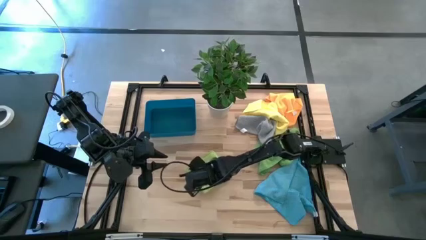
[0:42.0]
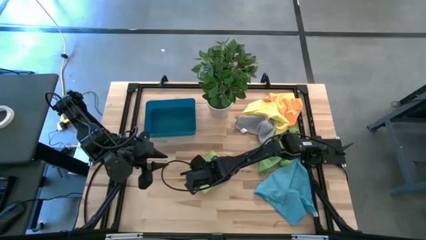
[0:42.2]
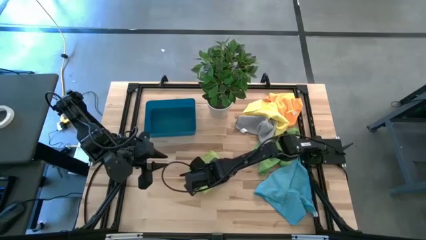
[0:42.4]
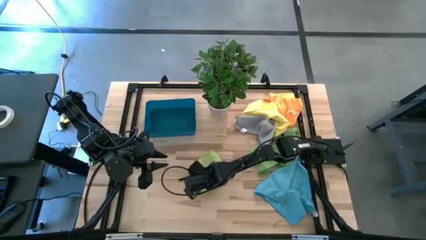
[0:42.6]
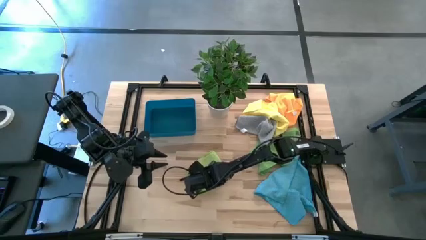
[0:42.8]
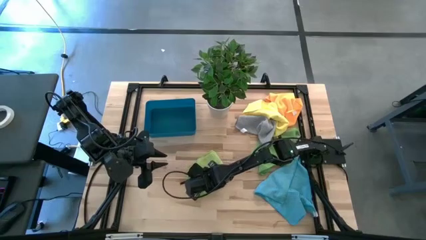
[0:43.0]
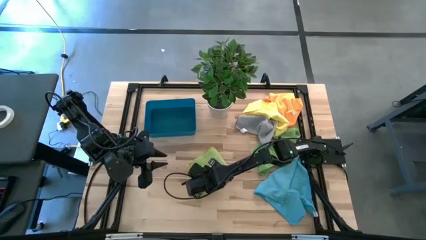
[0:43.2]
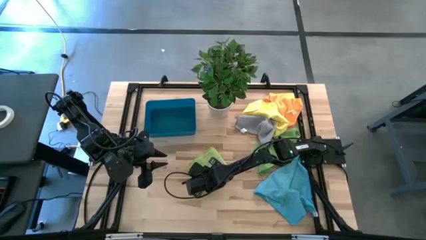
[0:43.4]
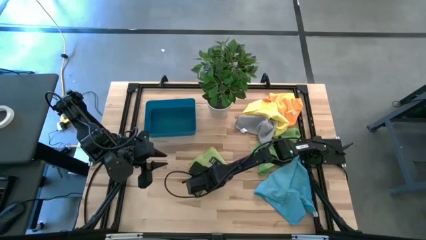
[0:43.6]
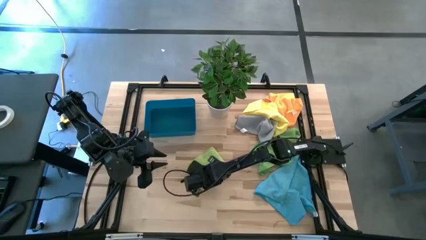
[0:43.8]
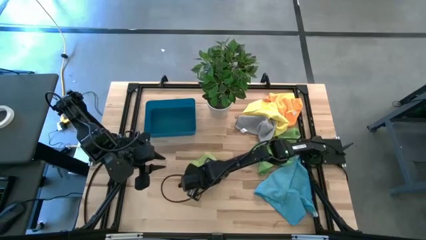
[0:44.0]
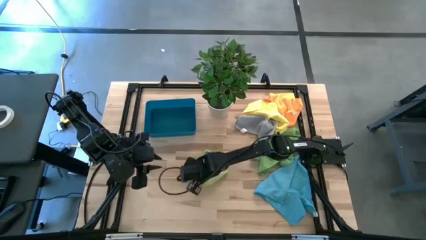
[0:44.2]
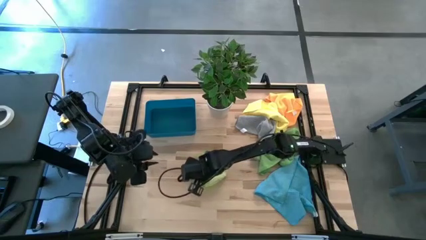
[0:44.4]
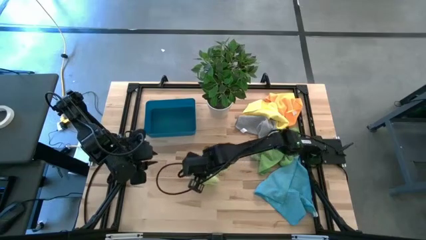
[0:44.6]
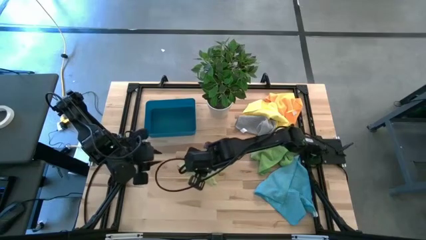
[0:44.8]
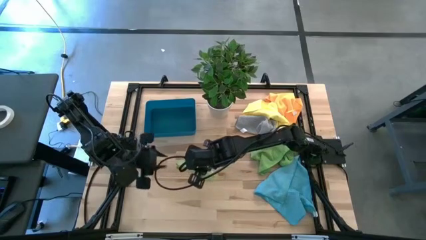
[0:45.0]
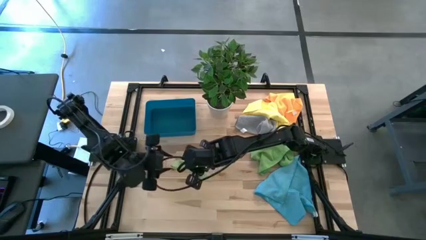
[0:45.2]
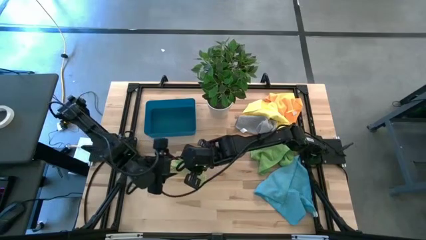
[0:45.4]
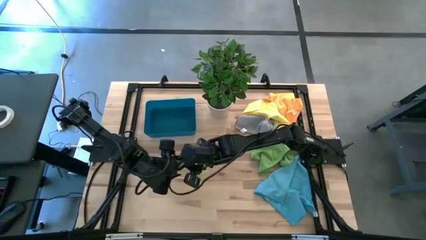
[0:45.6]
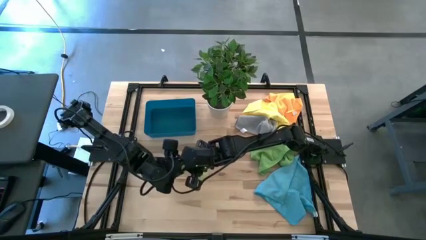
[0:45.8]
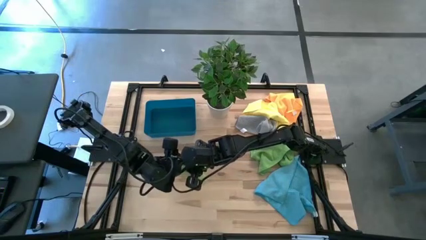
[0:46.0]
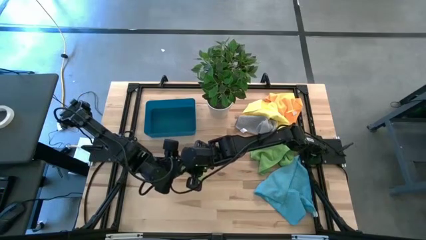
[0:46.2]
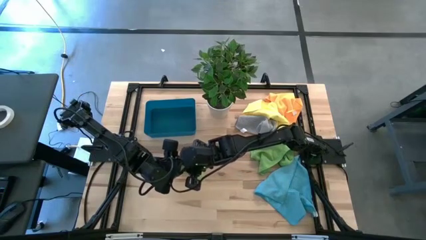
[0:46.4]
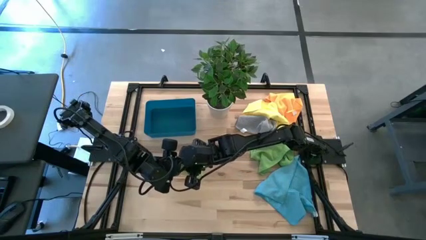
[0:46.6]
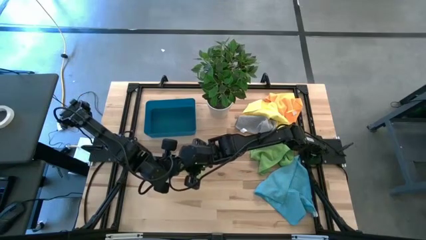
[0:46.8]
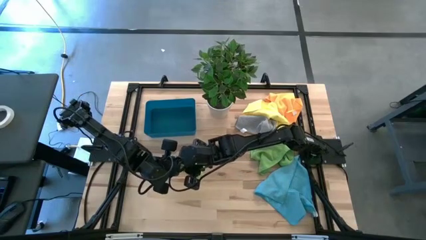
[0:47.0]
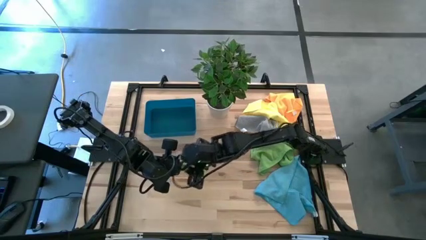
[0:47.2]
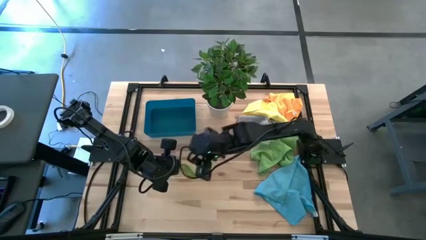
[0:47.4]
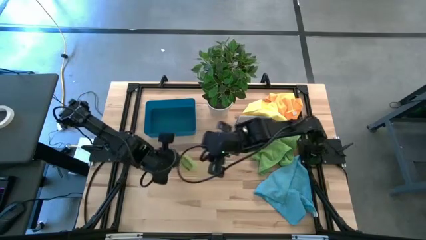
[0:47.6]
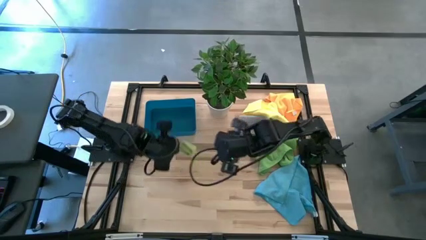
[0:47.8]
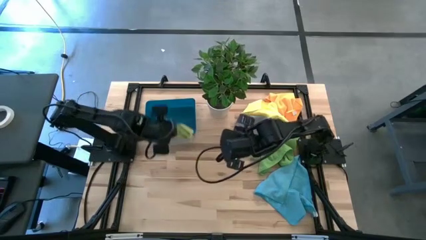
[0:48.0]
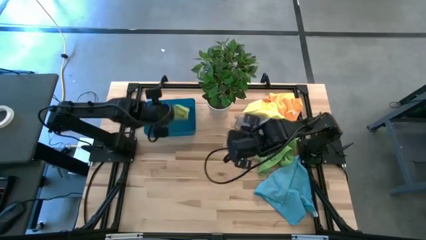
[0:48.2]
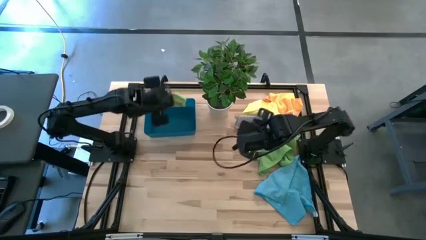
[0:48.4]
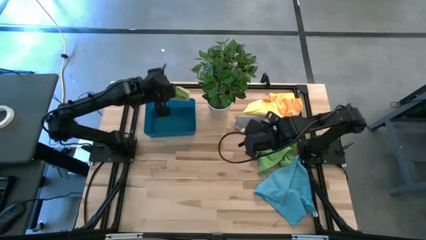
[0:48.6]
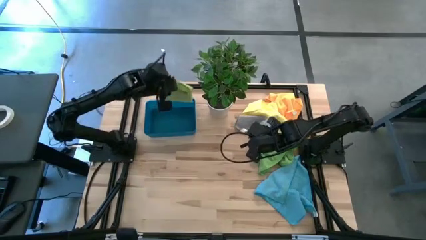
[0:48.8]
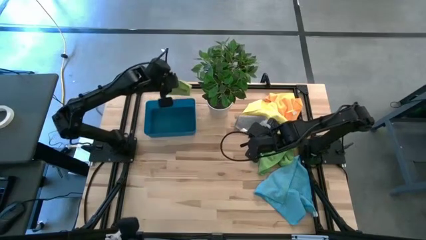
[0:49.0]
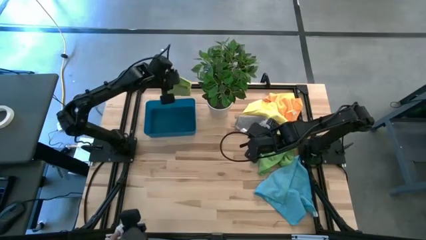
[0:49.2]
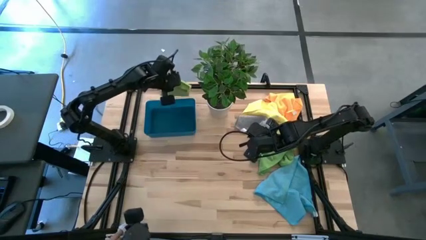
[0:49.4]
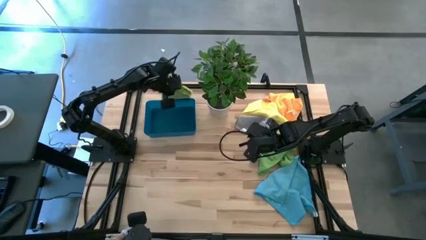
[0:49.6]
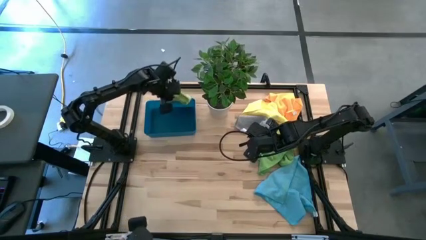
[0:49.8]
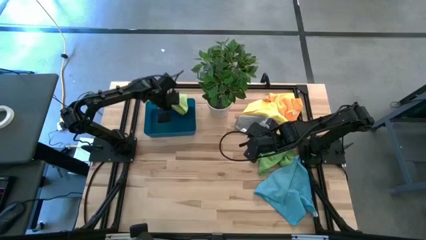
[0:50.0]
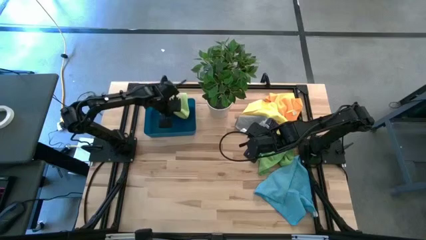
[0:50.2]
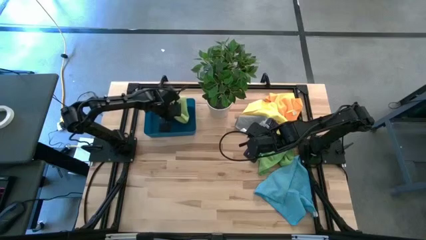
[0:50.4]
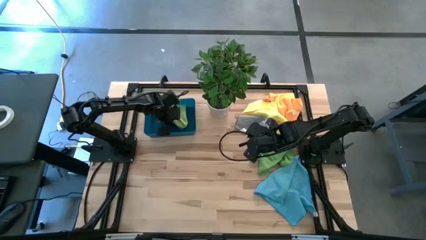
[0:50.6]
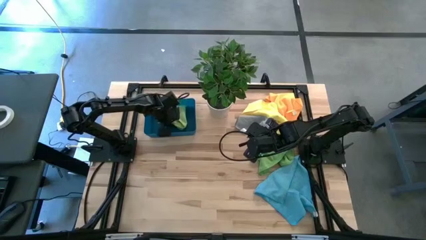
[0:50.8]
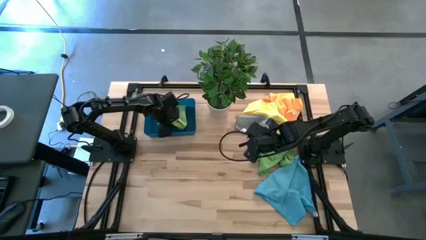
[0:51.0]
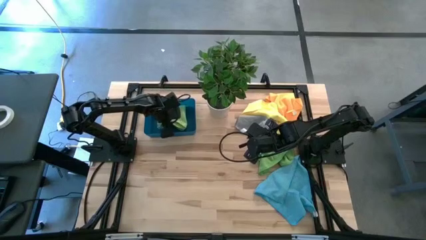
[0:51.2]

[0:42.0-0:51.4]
Task: Fold microfiber towels
Put the light green towel into the blue bin
